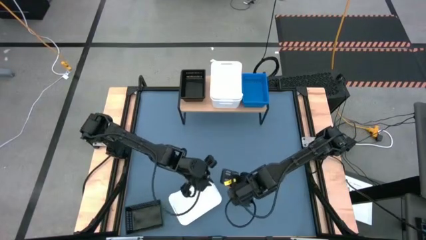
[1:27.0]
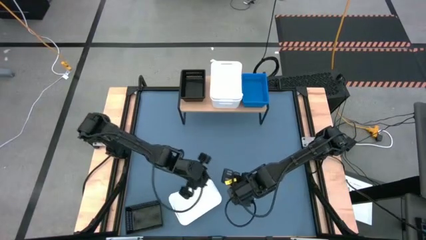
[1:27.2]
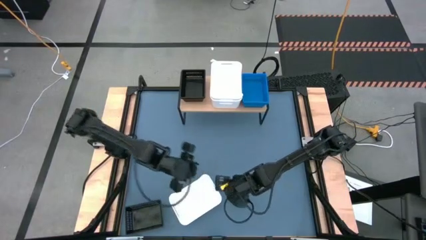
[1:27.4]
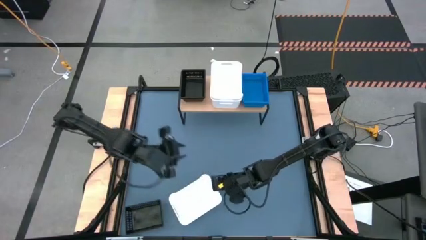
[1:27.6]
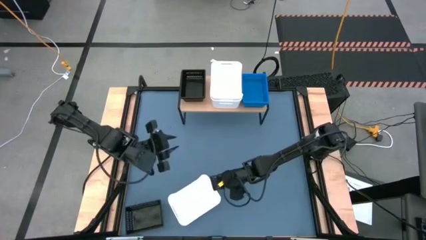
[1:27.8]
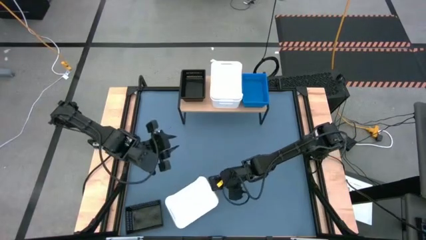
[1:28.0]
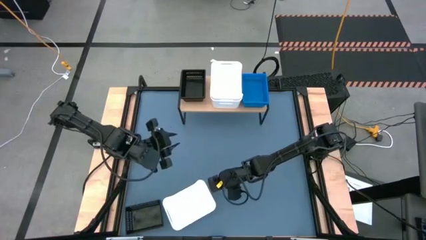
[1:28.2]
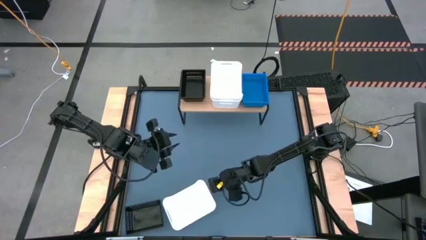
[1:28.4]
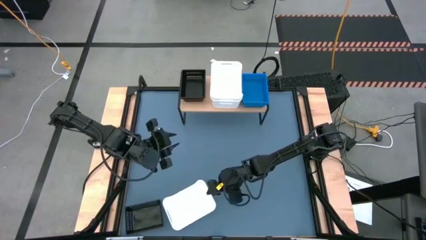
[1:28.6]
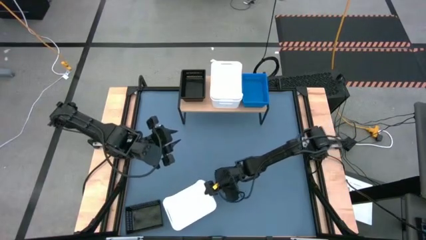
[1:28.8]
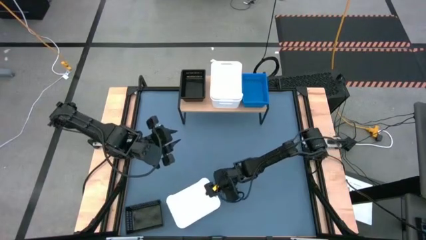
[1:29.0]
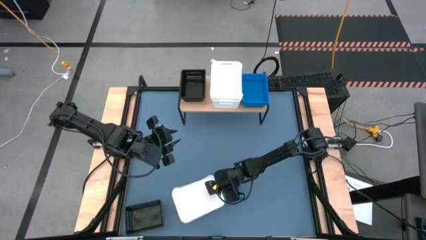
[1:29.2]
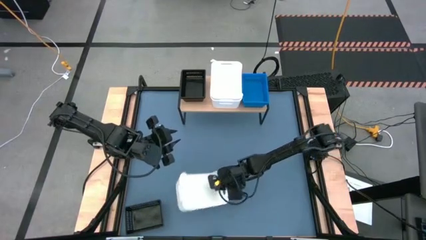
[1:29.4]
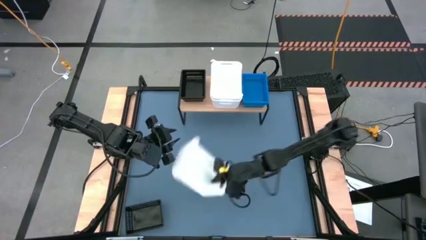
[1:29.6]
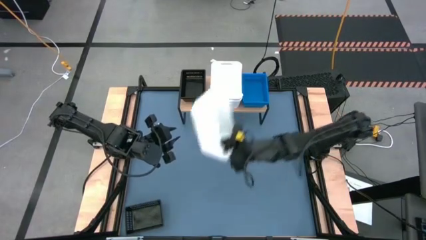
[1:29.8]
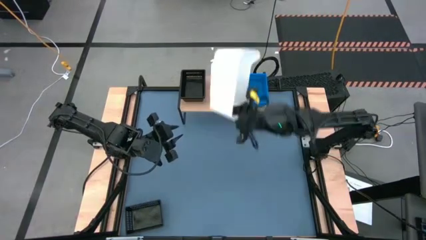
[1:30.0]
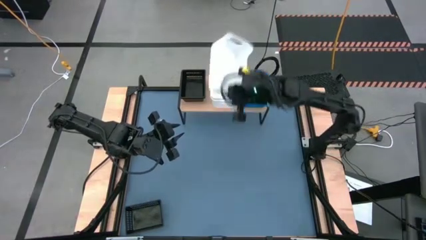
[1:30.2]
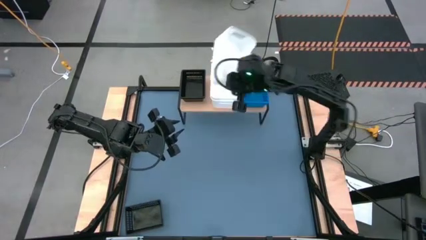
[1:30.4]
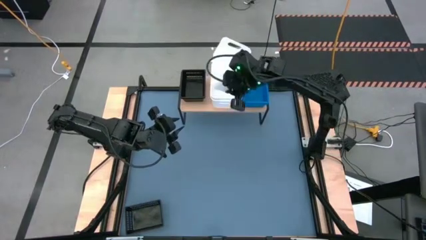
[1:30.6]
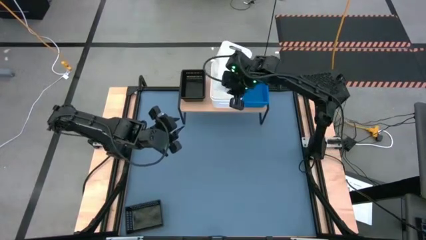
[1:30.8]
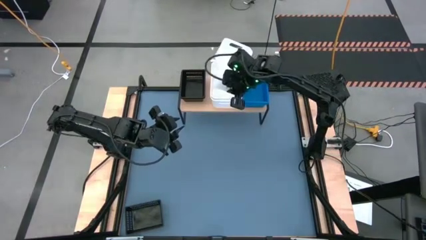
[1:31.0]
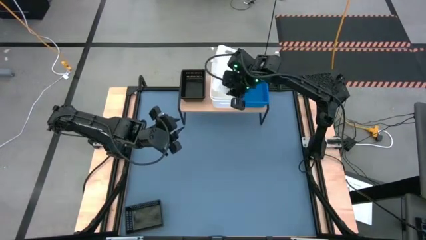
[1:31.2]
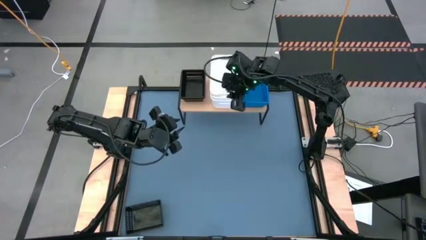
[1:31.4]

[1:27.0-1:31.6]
Task: Stack baskets on shelf by color
Stack the white bin on top of the other white bins on the shelf

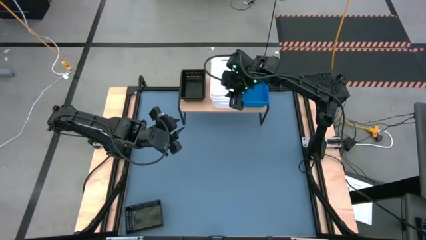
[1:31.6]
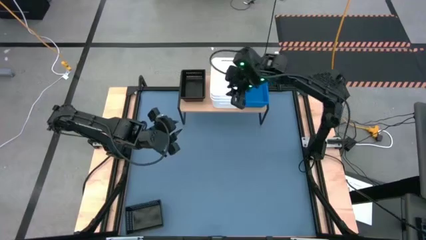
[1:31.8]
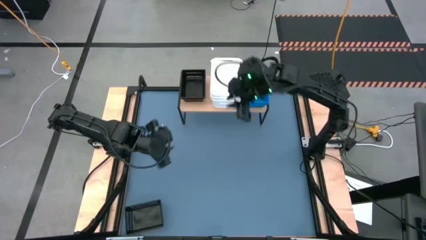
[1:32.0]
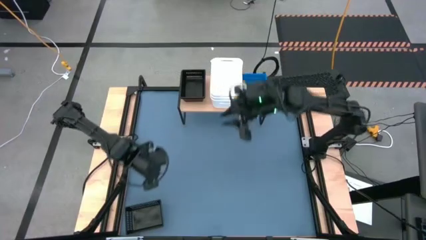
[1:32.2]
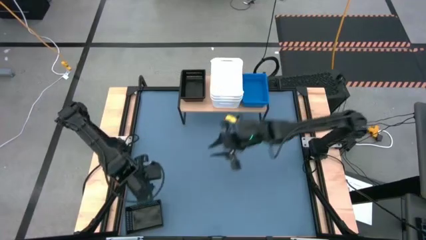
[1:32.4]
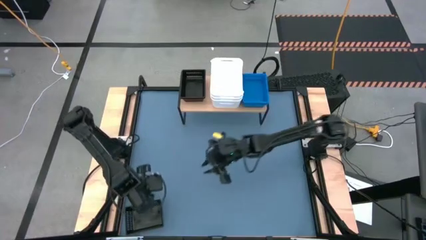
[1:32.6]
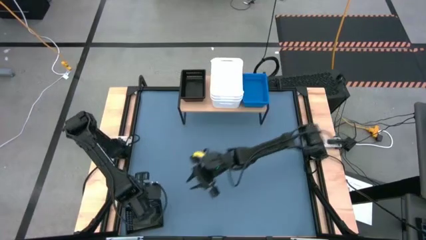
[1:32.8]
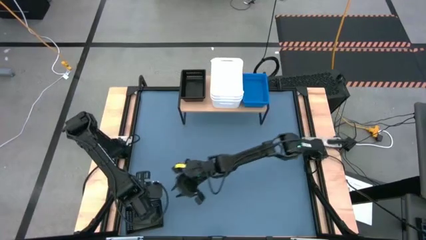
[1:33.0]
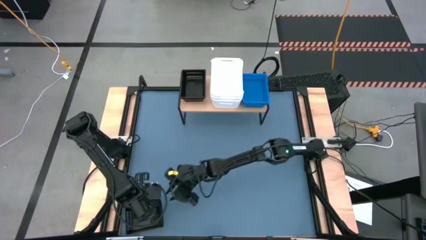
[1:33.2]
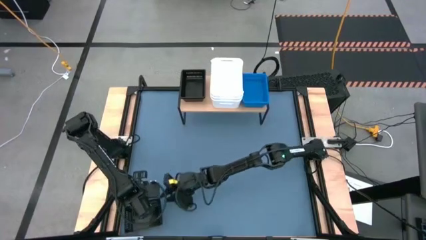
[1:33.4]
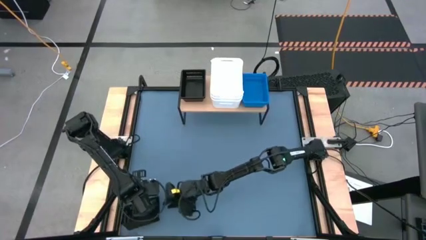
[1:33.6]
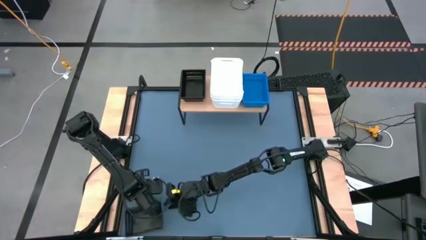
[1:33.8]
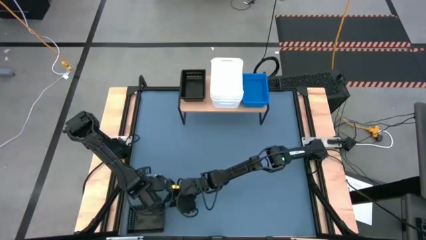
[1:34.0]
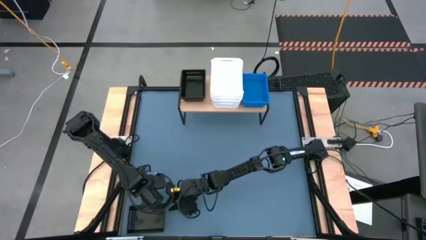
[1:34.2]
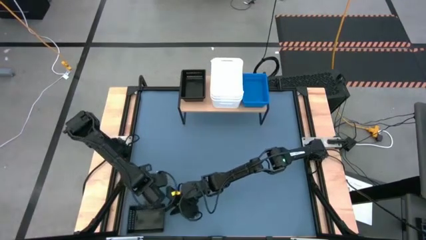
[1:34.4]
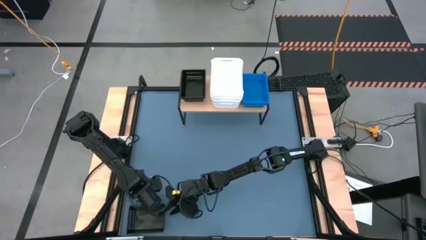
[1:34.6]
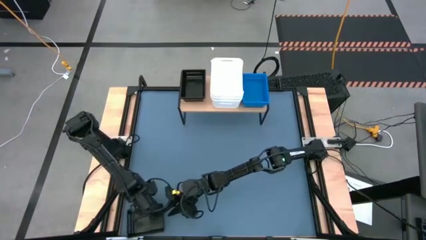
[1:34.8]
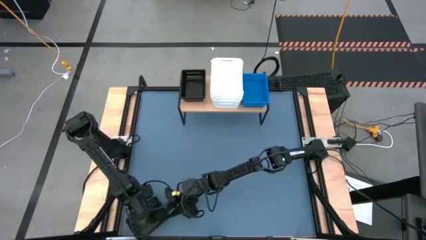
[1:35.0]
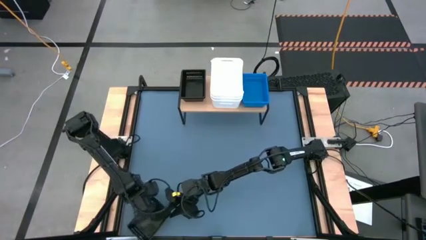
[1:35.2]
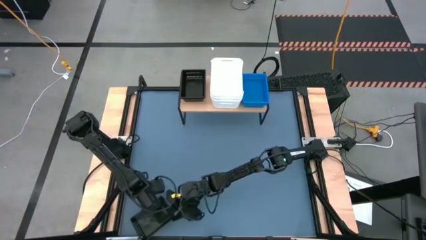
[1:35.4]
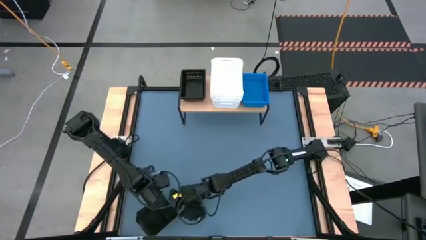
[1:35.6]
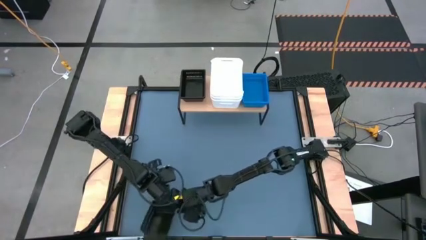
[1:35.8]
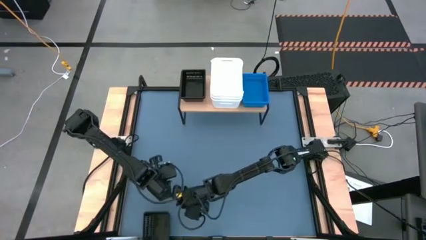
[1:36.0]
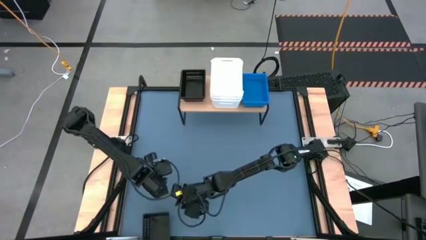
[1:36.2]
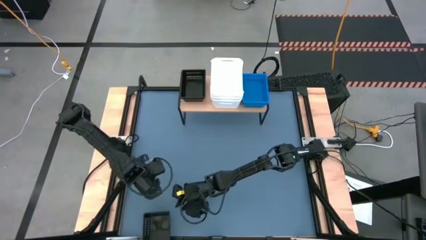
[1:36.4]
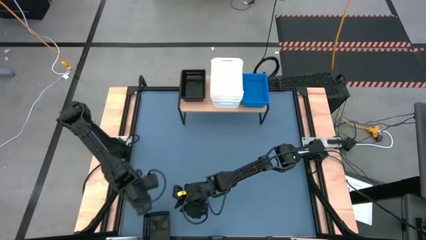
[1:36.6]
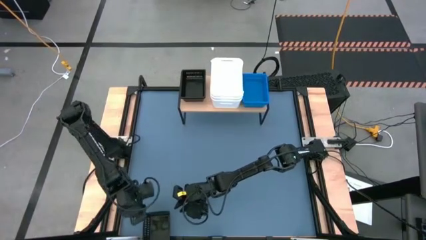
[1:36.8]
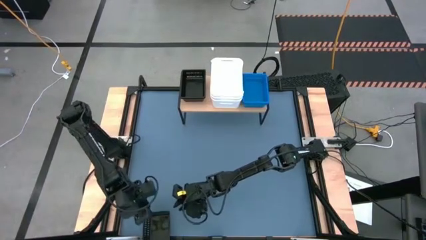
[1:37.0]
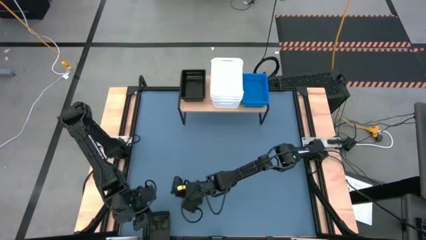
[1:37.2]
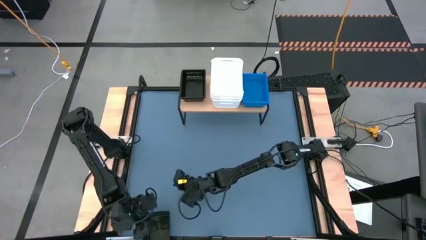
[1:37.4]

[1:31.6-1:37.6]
Stack the right black bin on top of the other black bins on the shelf

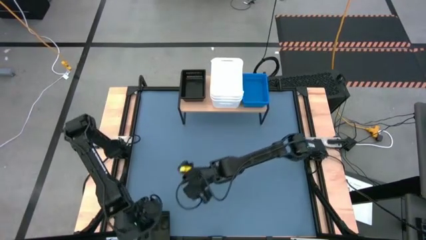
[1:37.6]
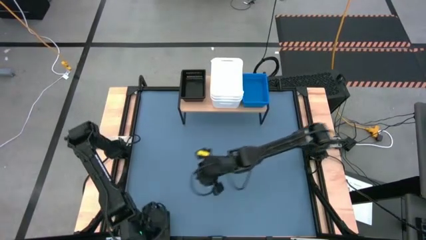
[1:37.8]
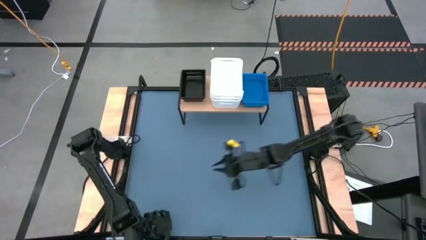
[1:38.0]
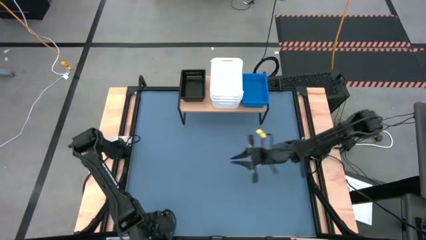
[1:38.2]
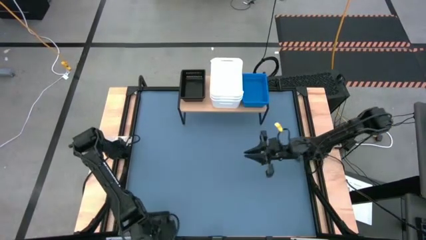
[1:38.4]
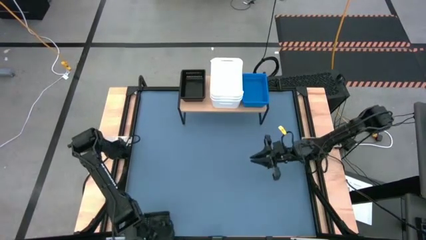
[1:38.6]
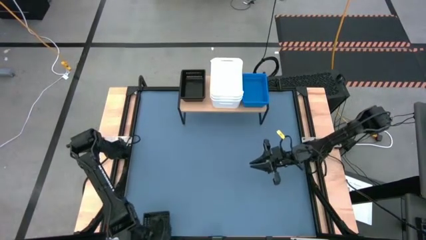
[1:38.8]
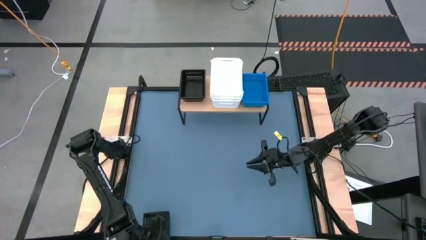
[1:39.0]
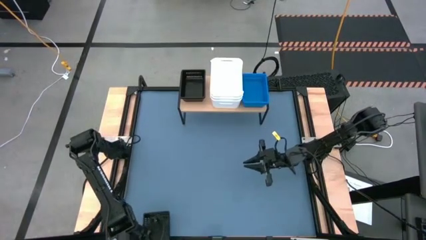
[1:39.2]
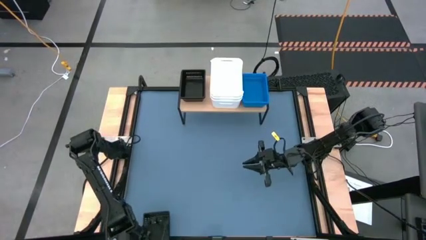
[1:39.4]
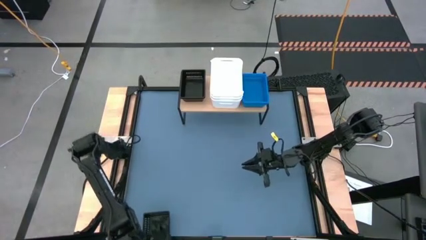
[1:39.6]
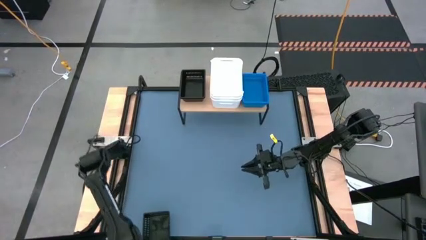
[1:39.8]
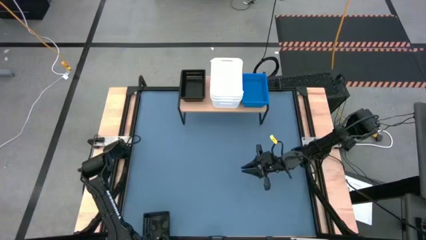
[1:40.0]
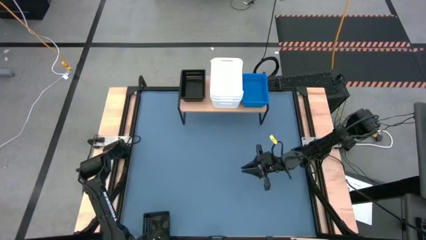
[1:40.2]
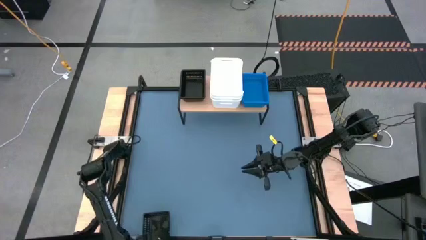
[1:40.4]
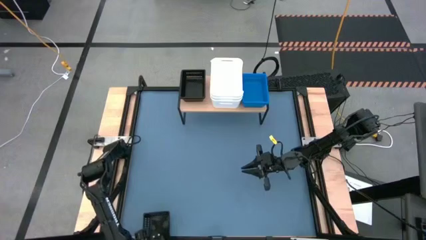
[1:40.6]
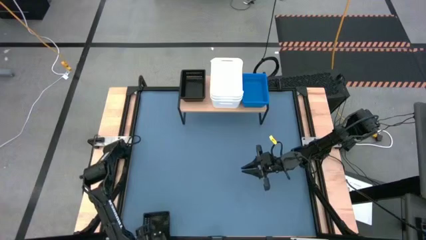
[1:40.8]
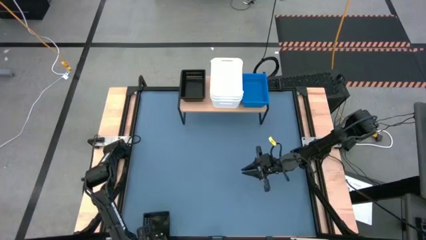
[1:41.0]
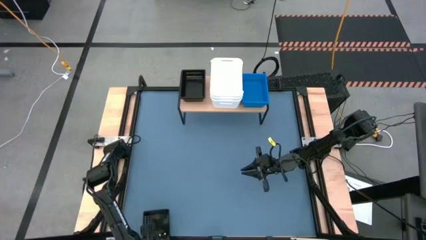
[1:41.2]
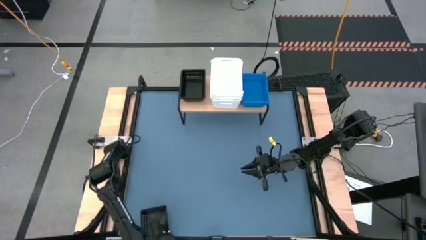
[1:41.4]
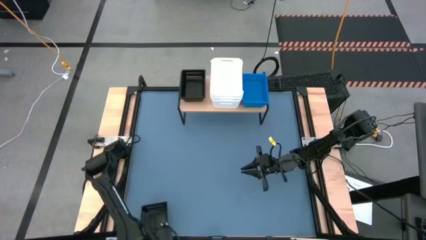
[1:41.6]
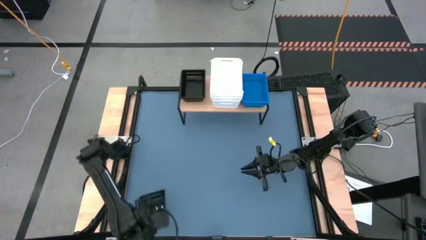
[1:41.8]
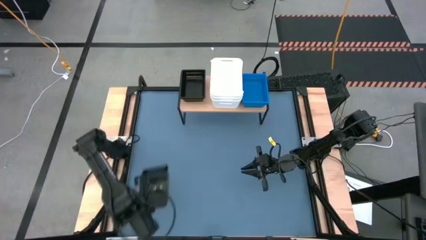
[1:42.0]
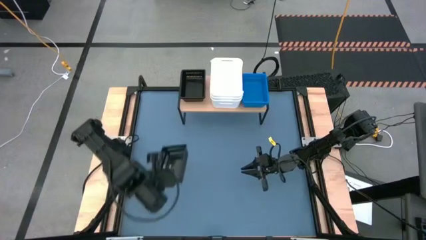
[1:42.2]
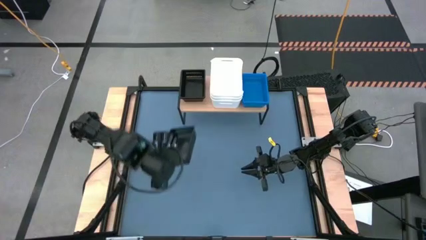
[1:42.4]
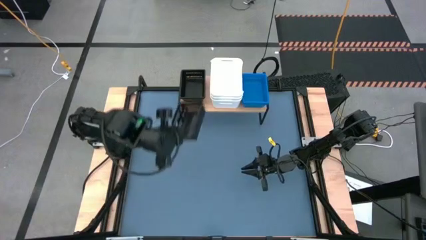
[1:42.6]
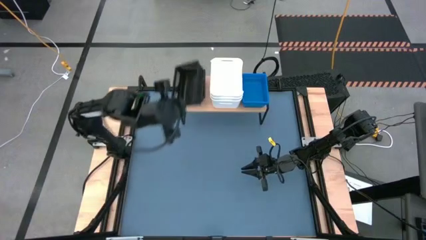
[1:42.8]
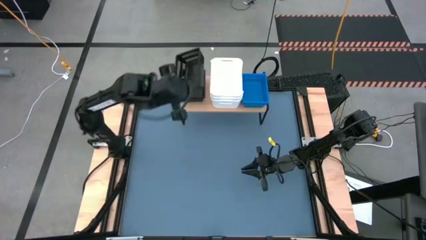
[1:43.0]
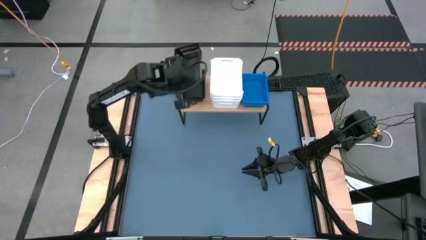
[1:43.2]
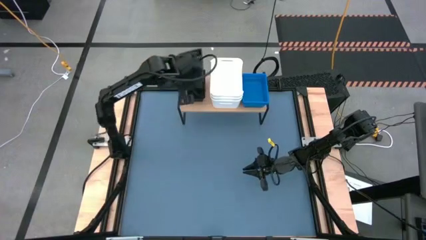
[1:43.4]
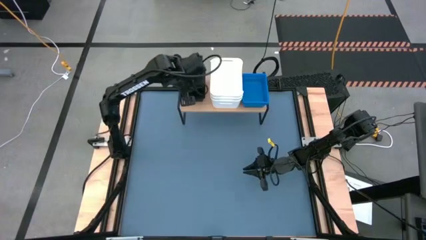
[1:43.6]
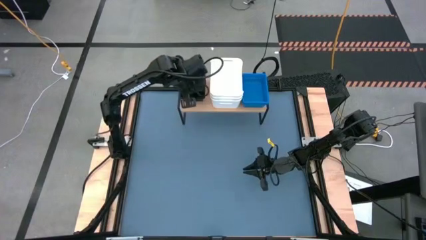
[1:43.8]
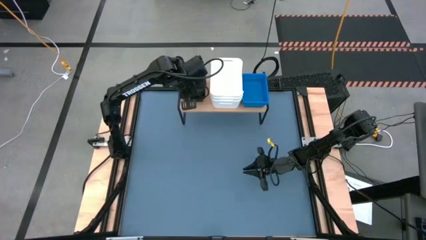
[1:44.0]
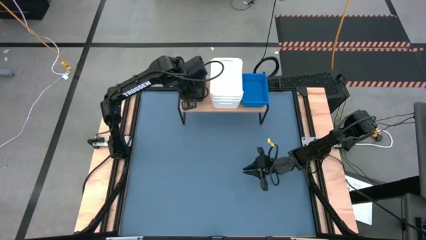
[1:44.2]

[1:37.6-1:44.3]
Stack the right black bin on top of the other black bins on the shelf
